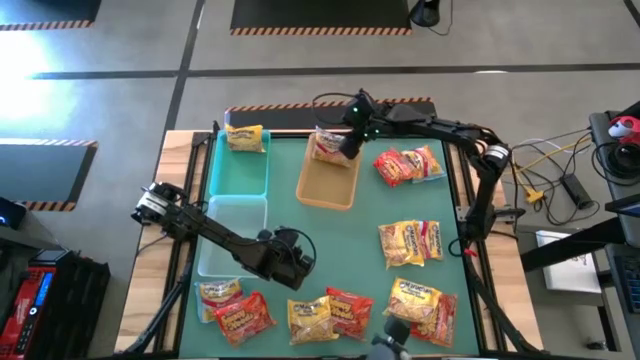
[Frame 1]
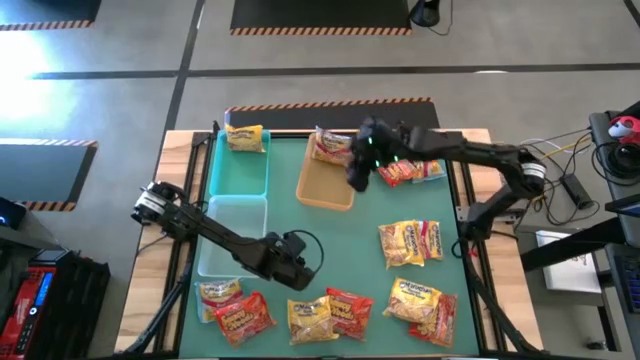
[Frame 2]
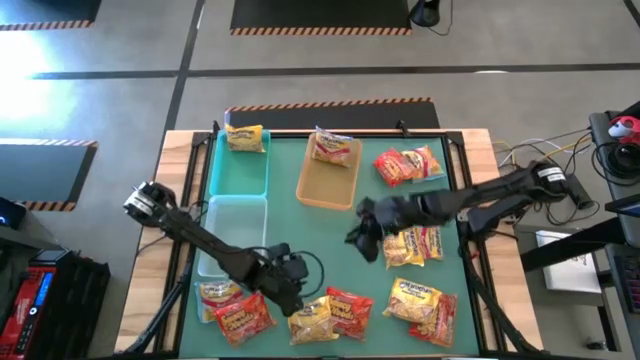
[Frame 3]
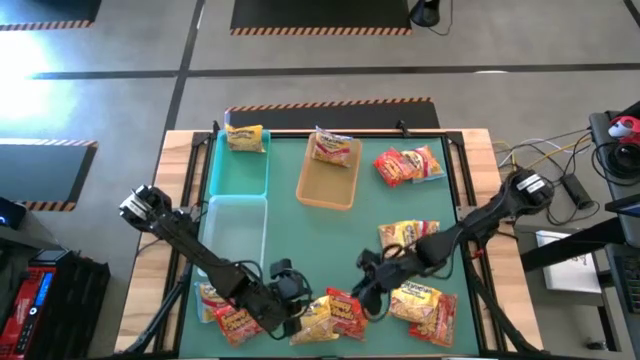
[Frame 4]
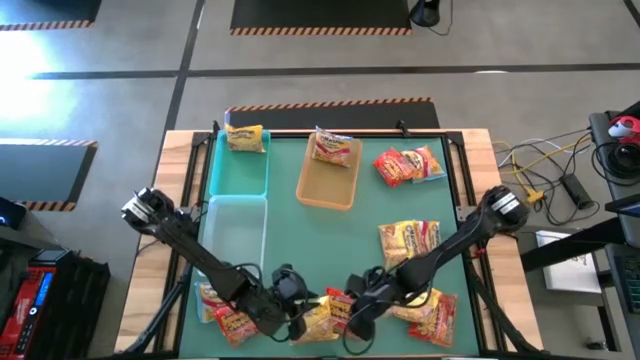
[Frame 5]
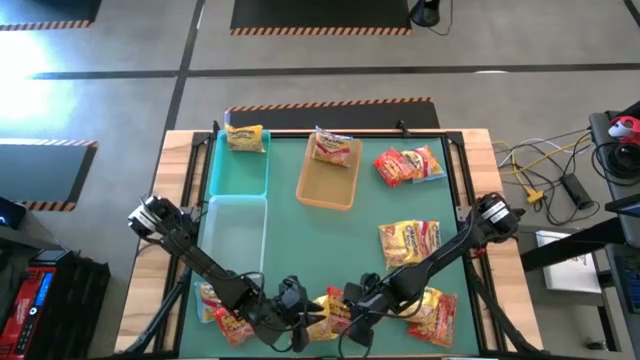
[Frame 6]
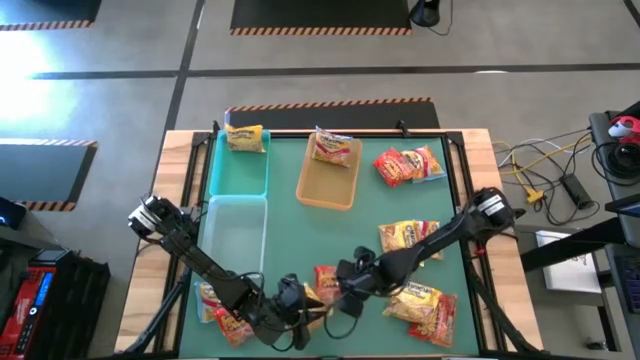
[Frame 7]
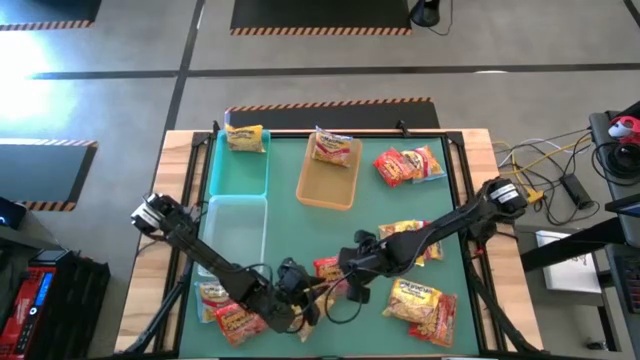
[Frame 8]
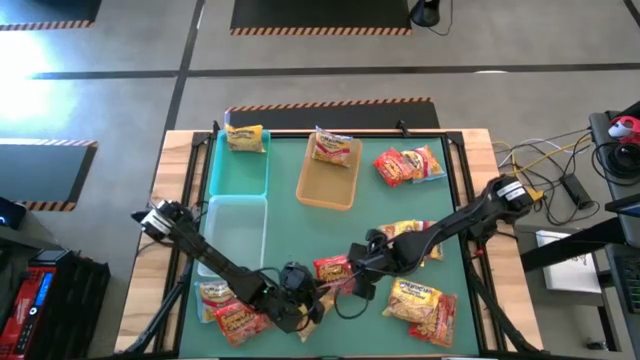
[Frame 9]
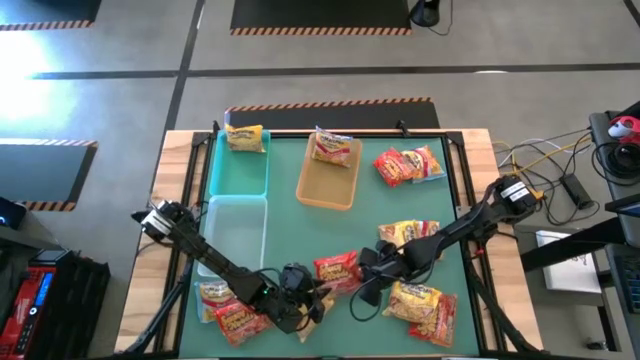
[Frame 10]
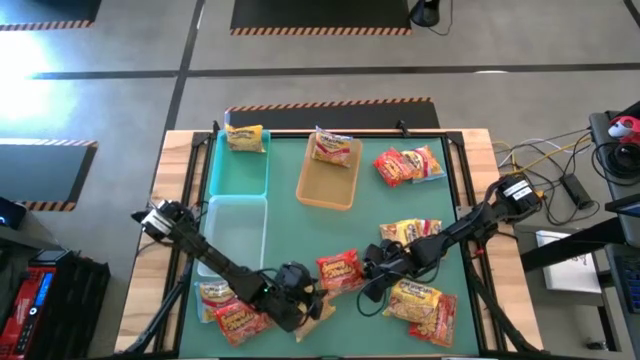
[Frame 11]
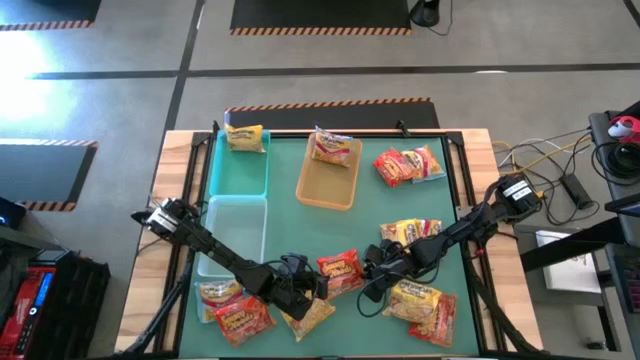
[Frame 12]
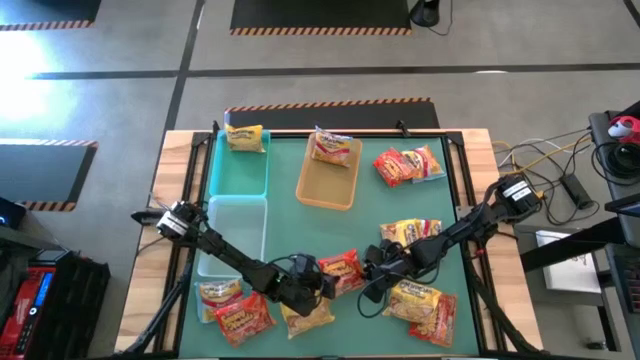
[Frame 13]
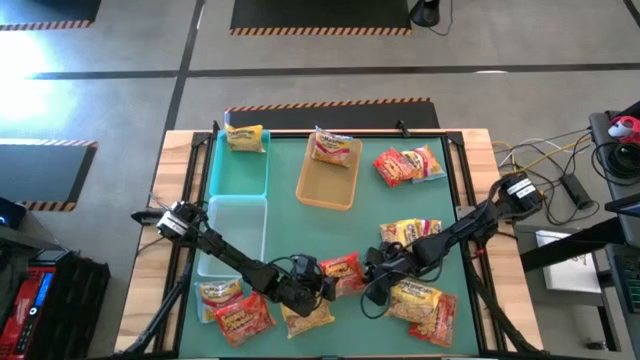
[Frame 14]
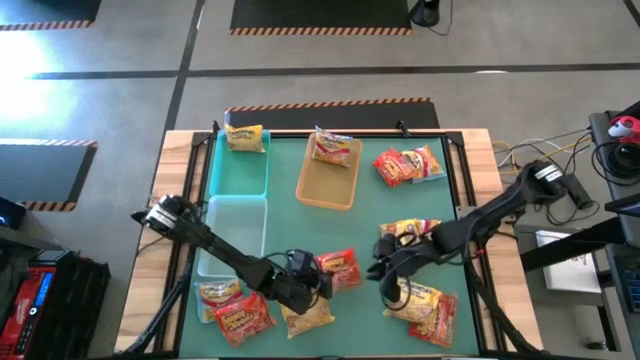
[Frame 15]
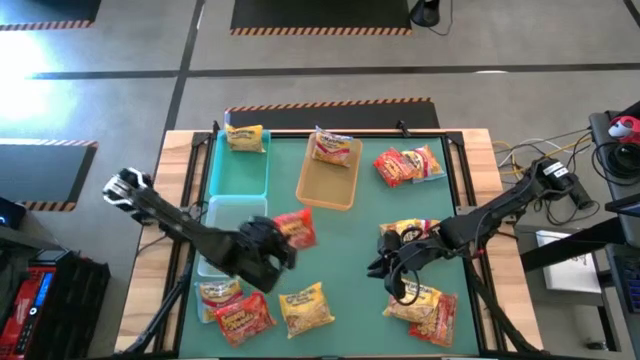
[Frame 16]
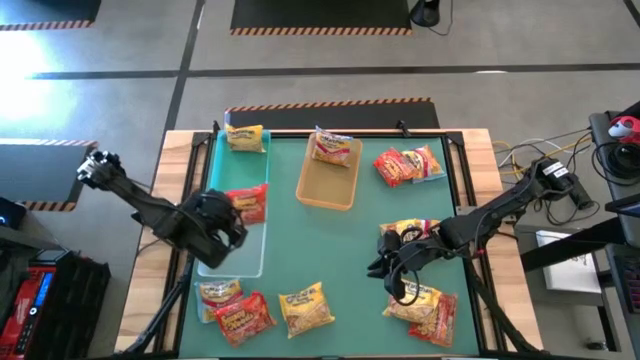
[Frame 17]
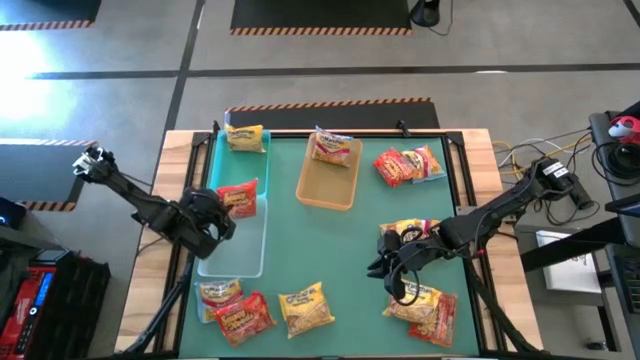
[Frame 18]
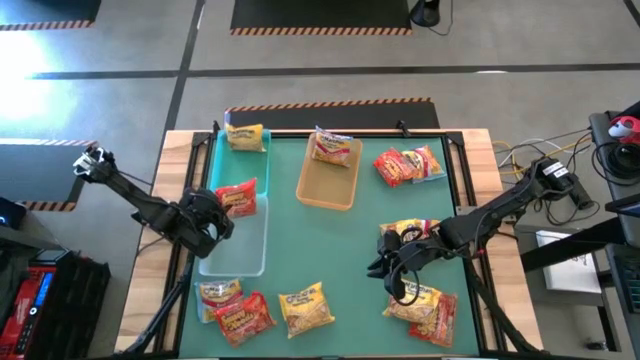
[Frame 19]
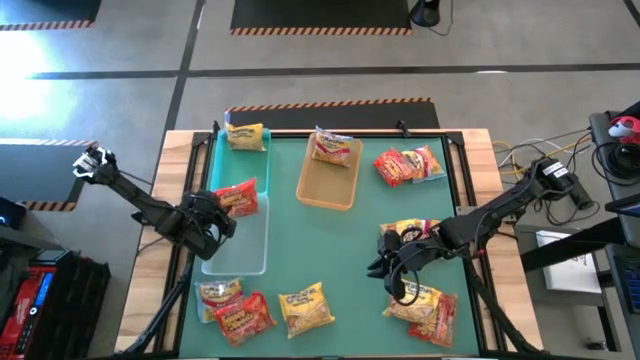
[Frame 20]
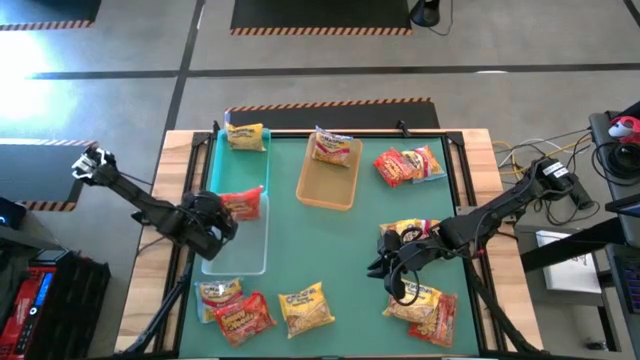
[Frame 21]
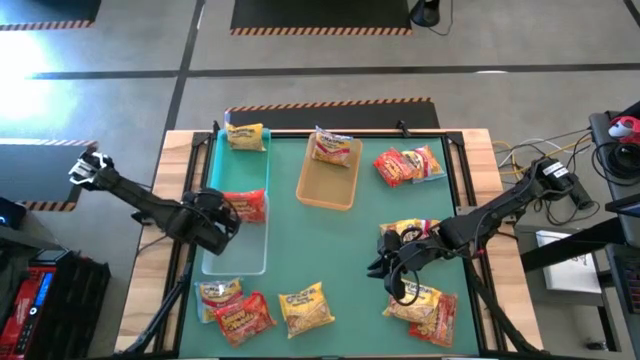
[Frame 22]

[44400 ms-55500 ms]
Task: Sort Maruchan noodles
Put the orange noodle pack into the white bin

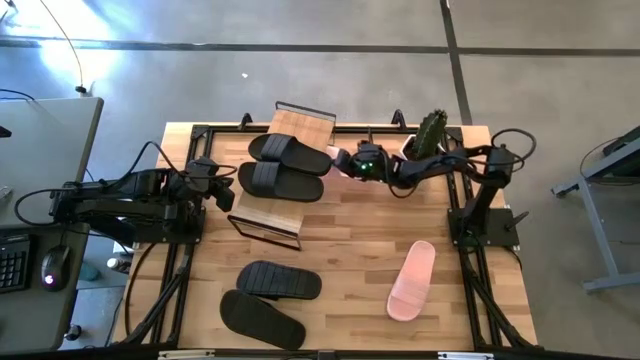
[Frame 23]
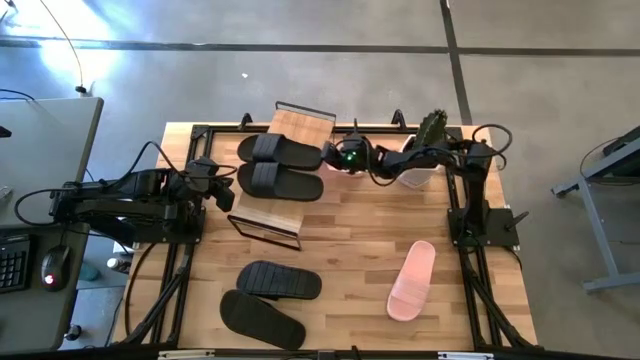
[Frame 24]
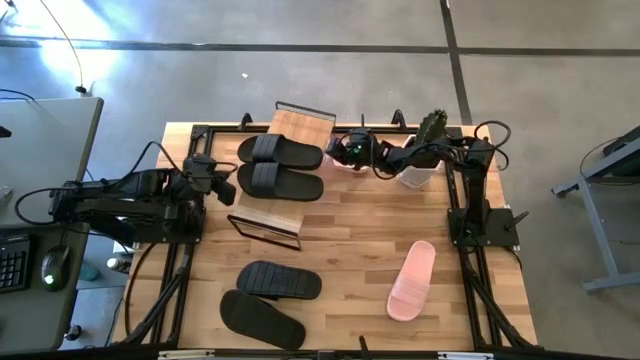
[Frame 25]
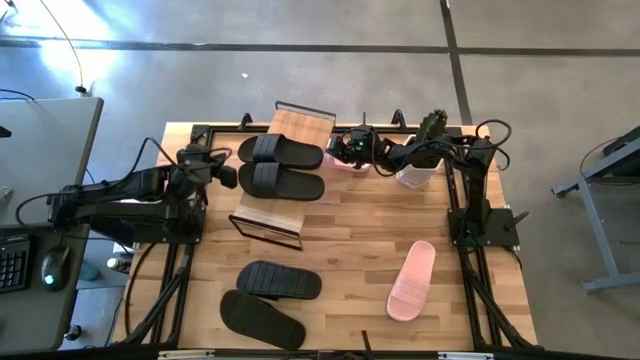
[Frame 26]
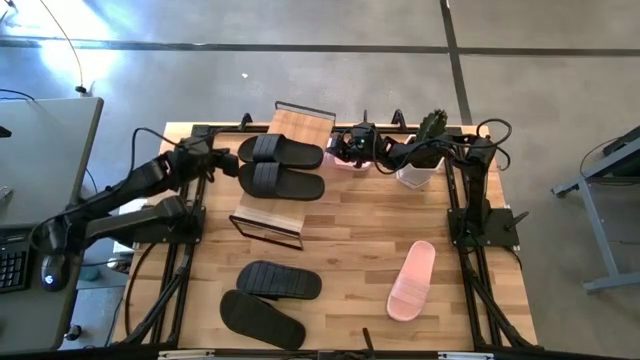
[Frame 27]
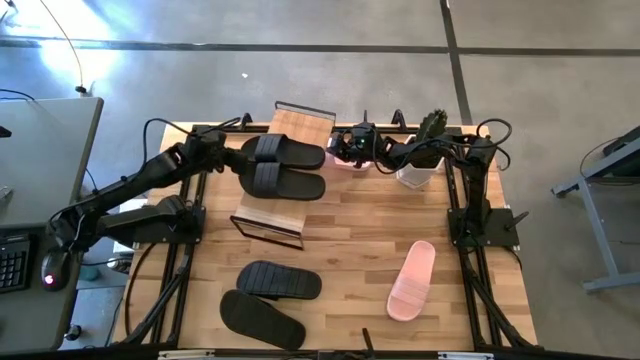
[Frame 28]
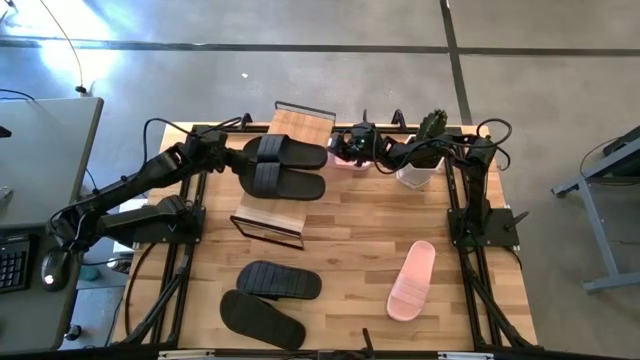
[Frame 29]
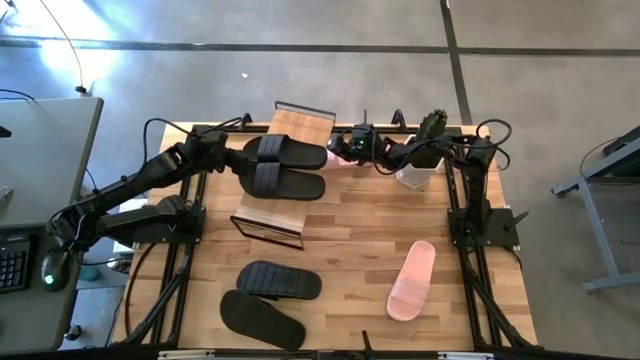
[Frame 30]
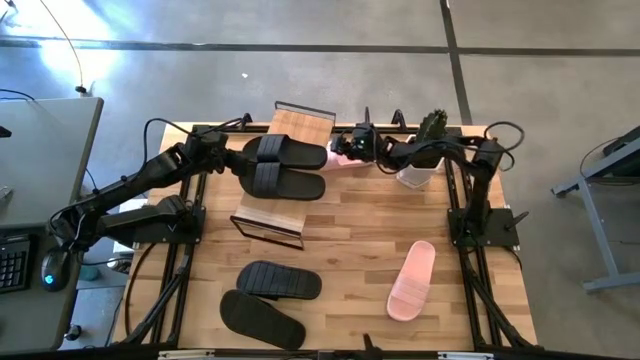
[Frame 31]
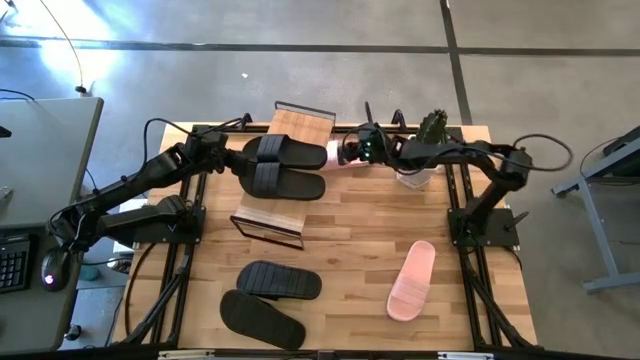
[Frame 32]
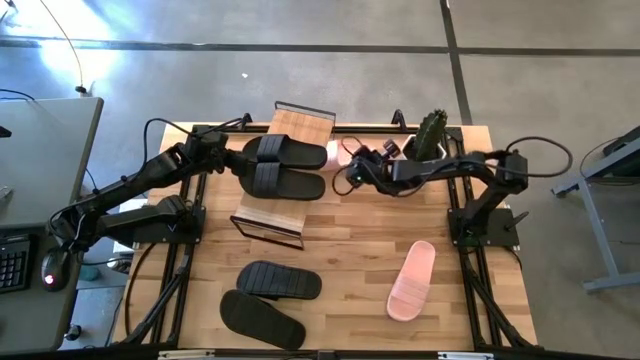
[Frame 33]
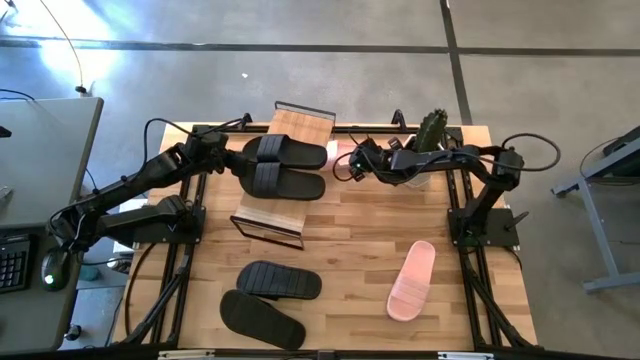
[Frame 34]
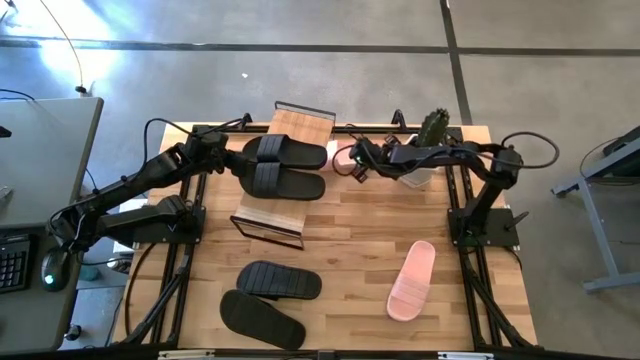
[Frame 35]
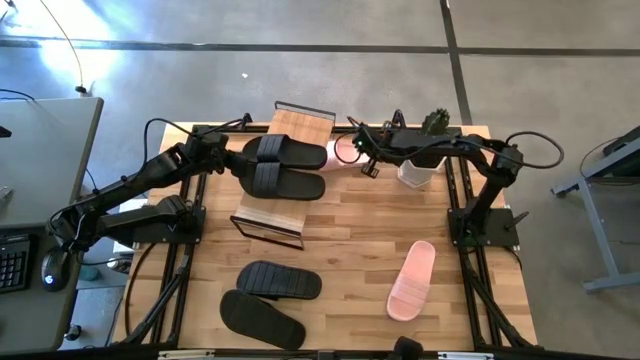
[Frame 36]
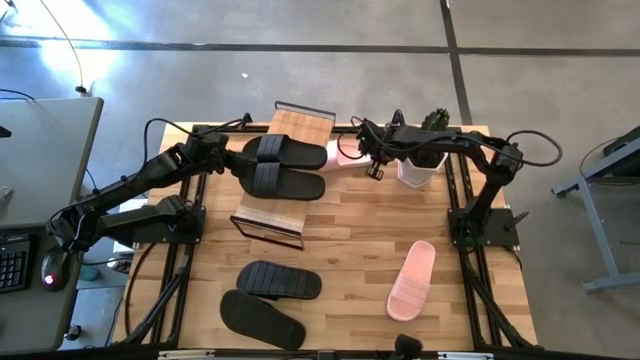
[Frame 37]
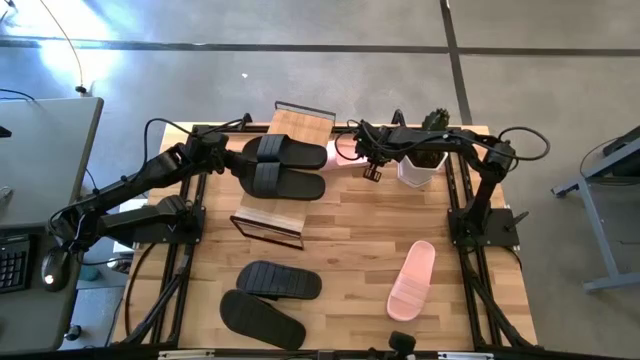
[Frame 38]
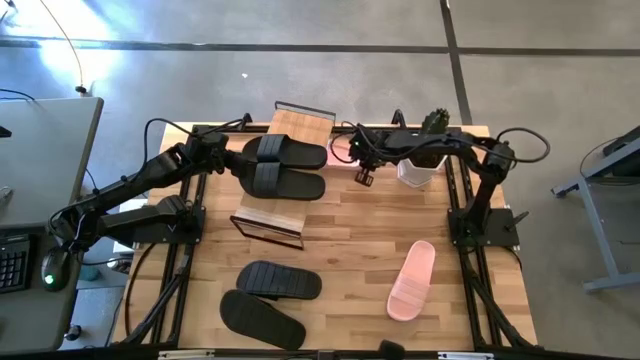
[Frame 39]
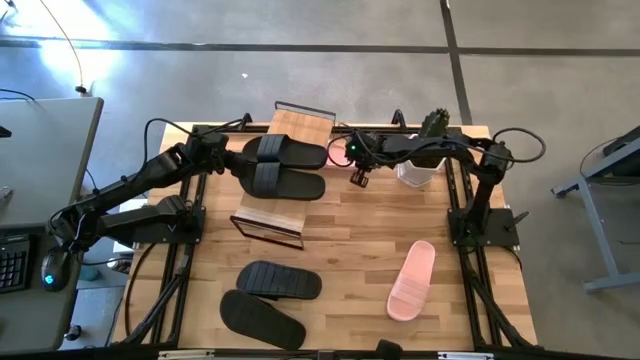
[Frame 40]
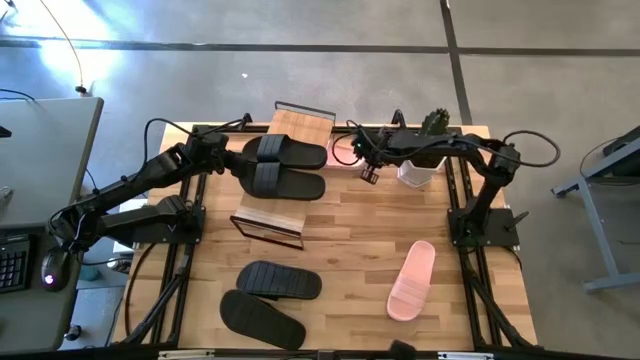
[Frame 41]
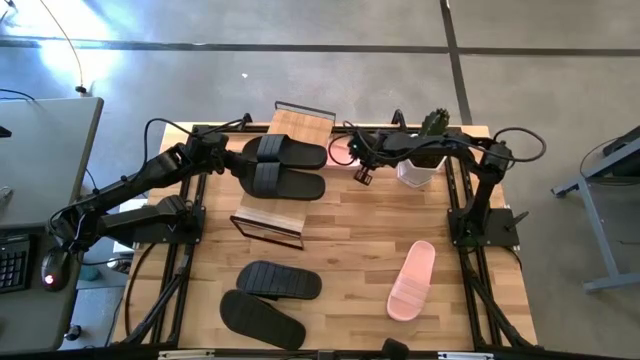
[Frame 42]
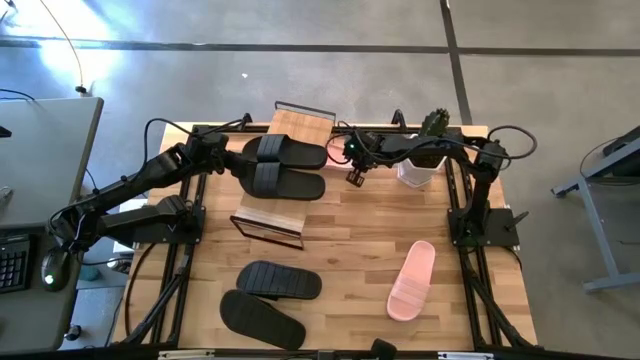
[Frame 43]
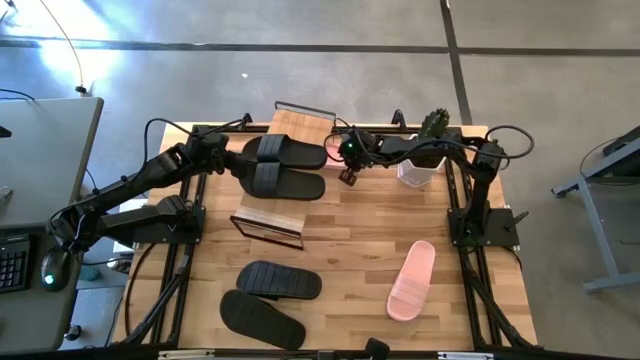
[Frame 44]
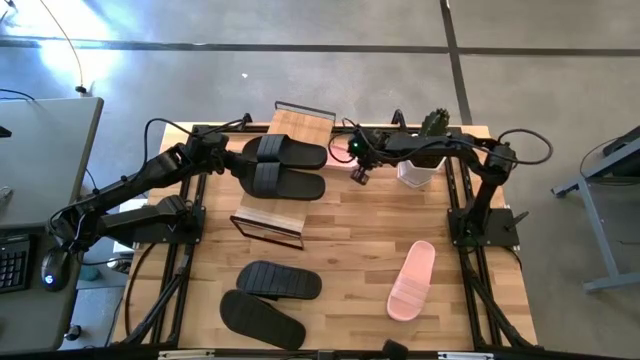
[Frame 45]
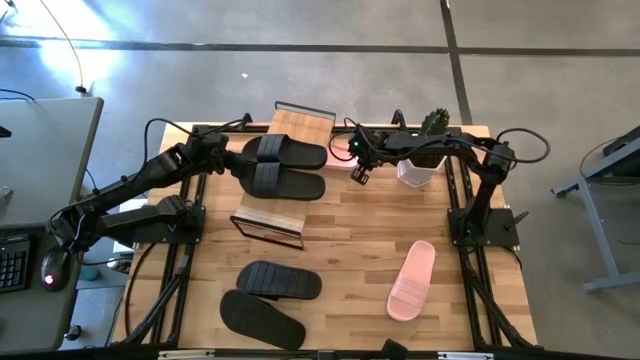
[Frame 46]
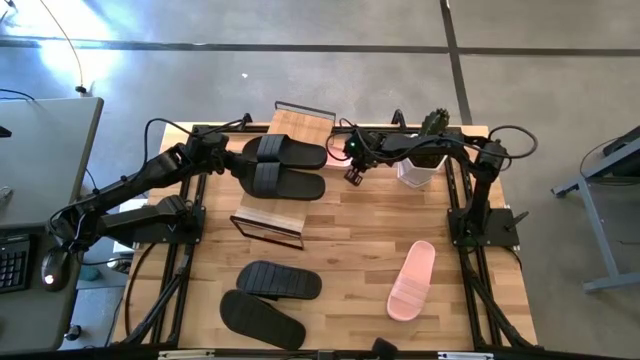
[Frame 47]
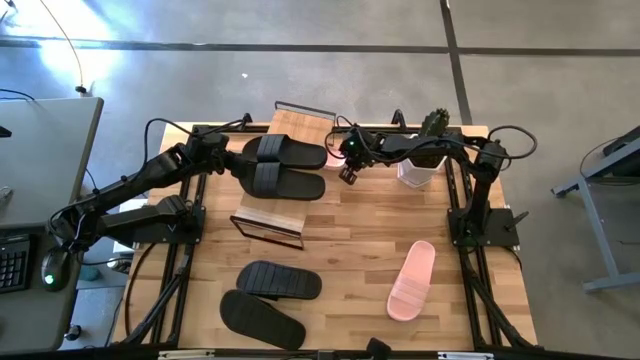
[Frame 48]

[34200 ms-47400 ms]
Task: Pick and place slides into the shelf
Put the pink slides under the shelf
